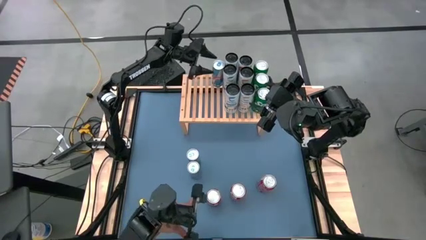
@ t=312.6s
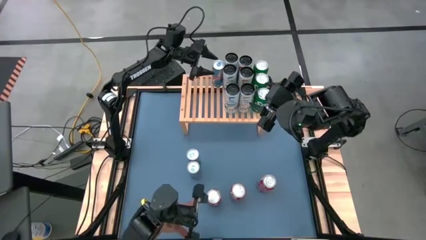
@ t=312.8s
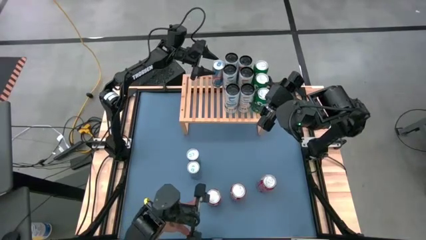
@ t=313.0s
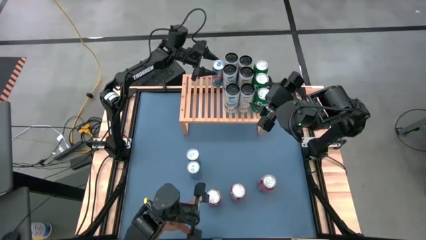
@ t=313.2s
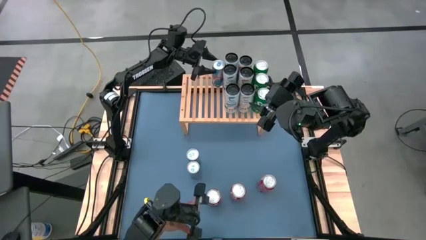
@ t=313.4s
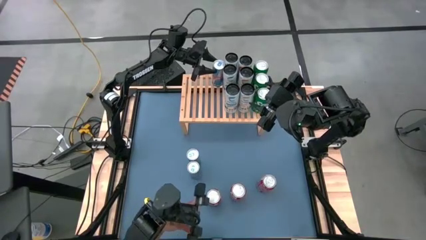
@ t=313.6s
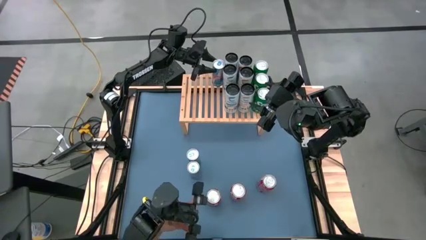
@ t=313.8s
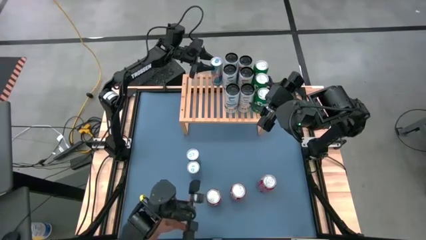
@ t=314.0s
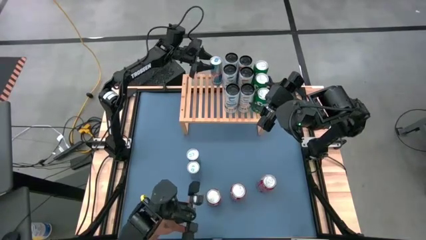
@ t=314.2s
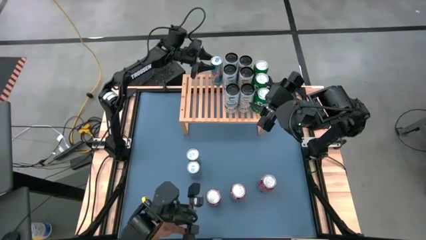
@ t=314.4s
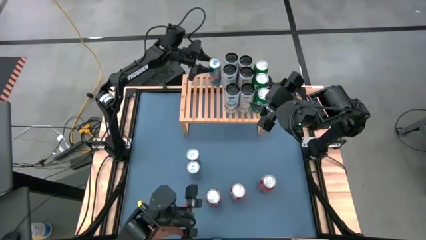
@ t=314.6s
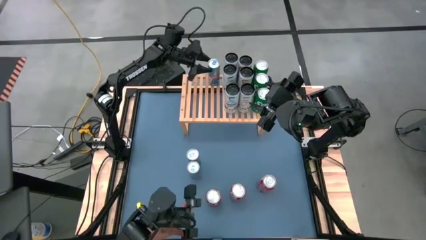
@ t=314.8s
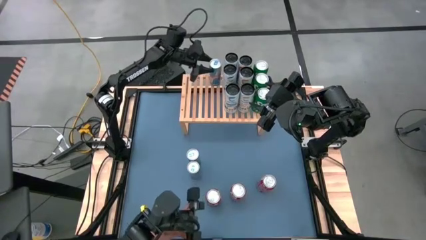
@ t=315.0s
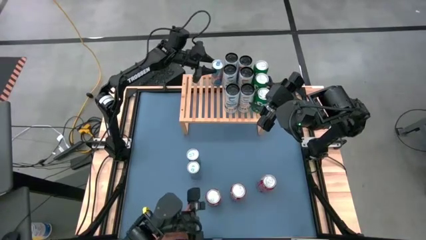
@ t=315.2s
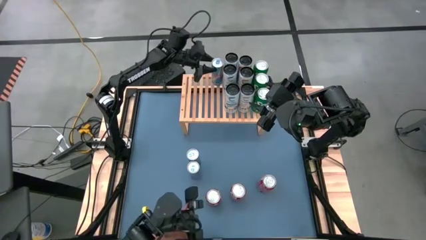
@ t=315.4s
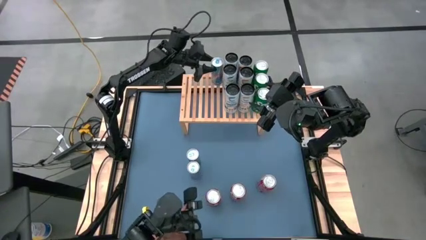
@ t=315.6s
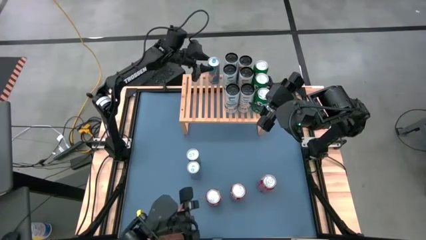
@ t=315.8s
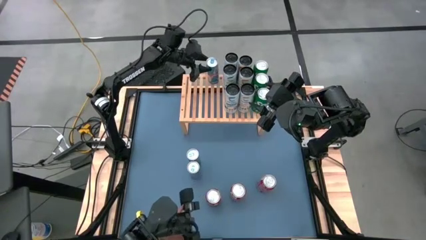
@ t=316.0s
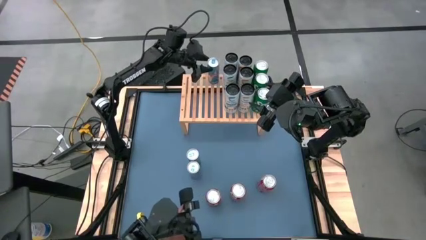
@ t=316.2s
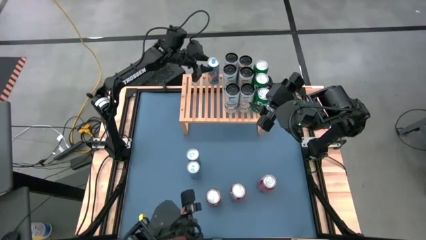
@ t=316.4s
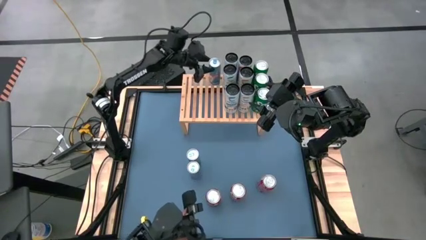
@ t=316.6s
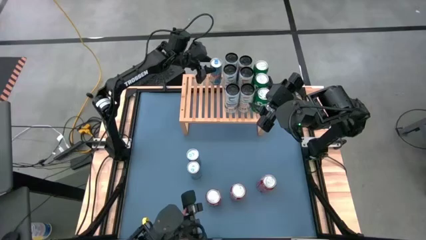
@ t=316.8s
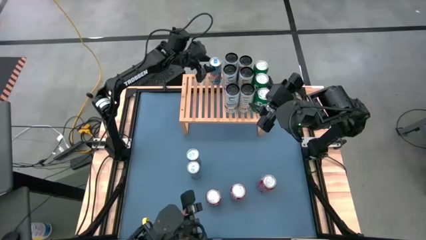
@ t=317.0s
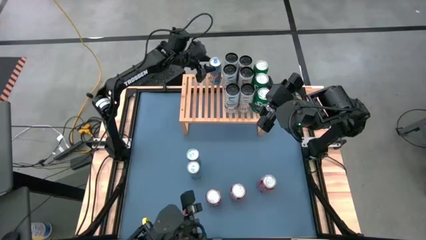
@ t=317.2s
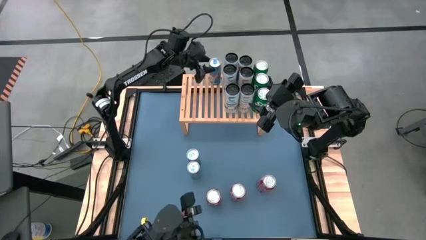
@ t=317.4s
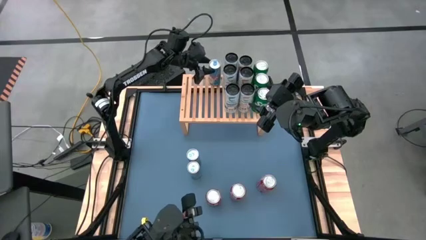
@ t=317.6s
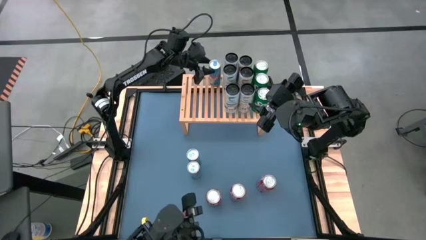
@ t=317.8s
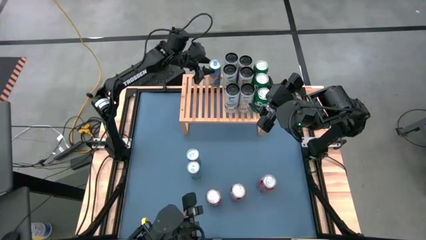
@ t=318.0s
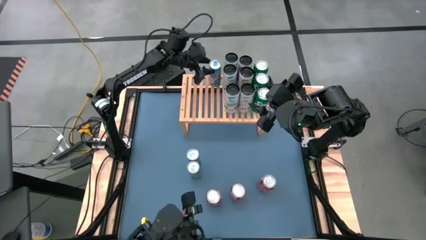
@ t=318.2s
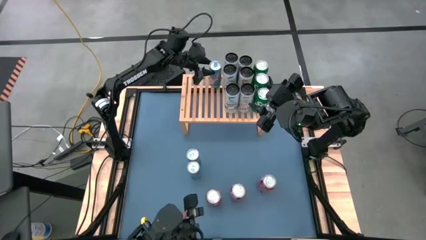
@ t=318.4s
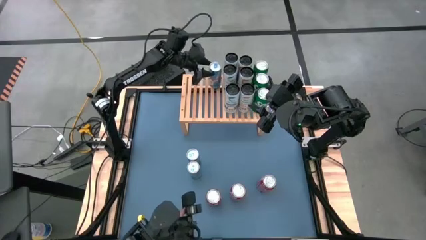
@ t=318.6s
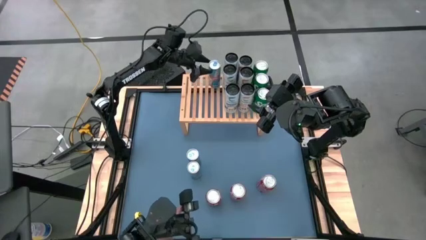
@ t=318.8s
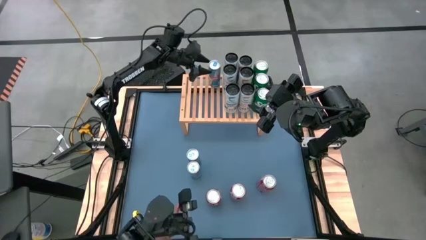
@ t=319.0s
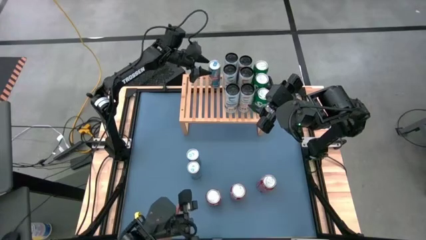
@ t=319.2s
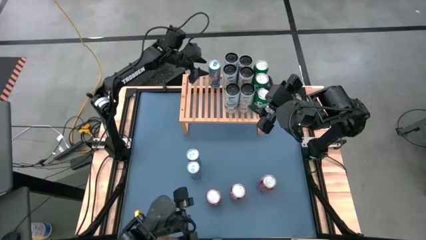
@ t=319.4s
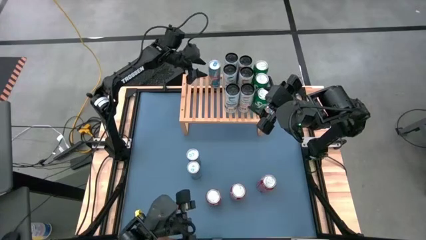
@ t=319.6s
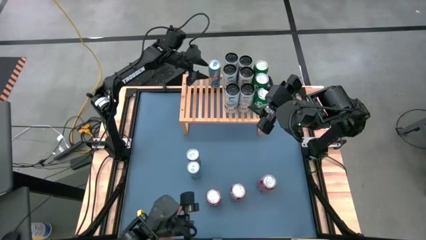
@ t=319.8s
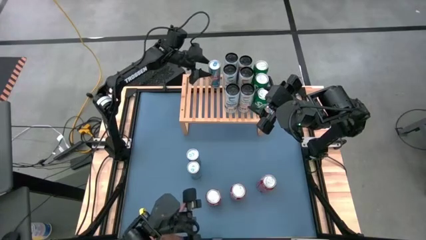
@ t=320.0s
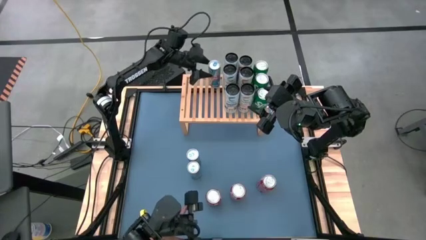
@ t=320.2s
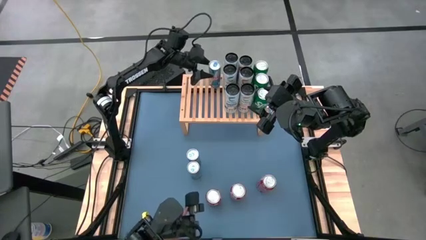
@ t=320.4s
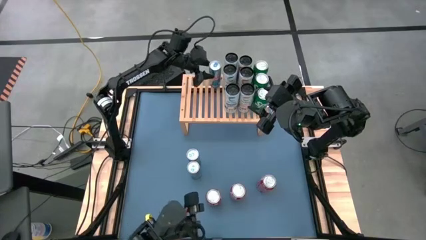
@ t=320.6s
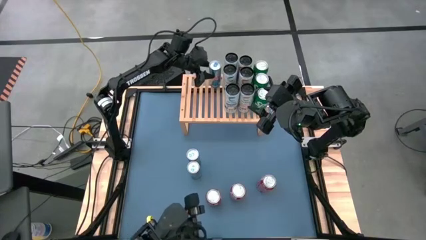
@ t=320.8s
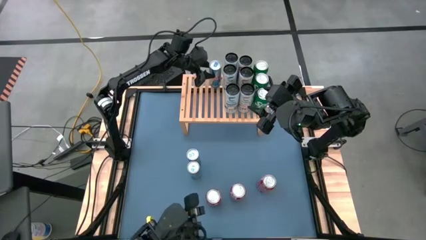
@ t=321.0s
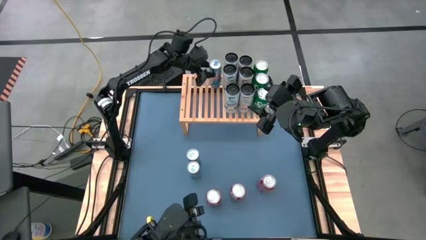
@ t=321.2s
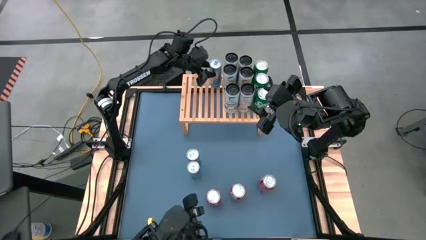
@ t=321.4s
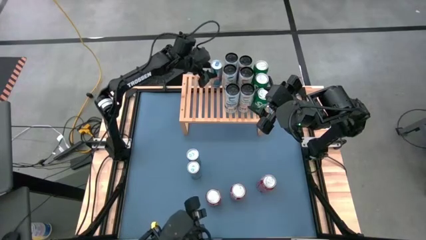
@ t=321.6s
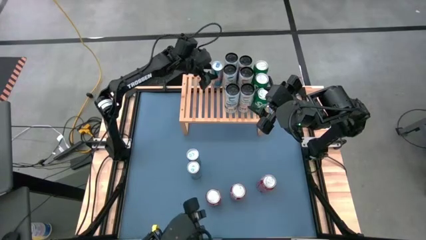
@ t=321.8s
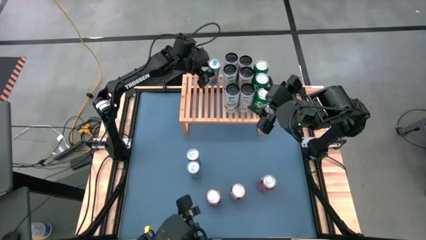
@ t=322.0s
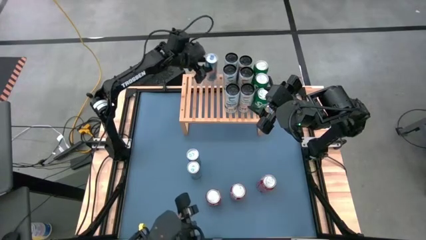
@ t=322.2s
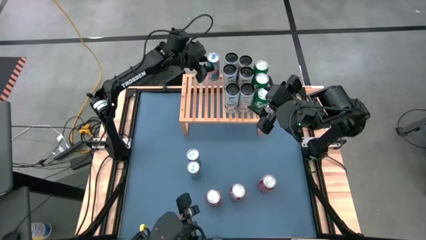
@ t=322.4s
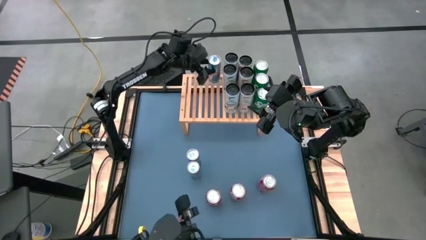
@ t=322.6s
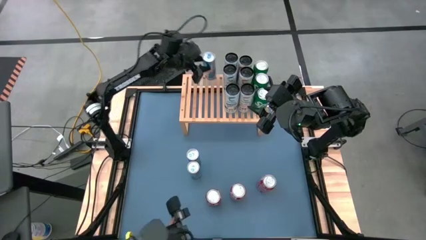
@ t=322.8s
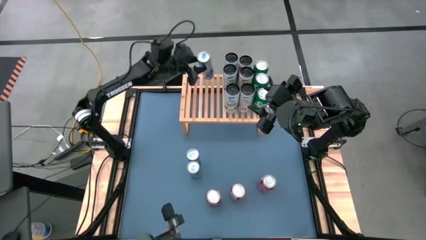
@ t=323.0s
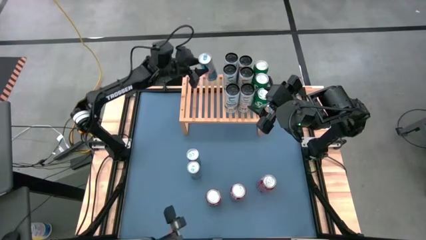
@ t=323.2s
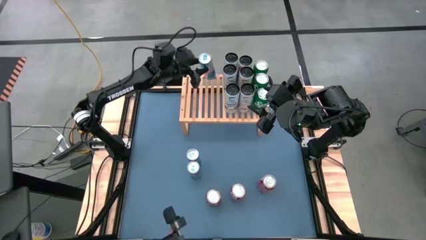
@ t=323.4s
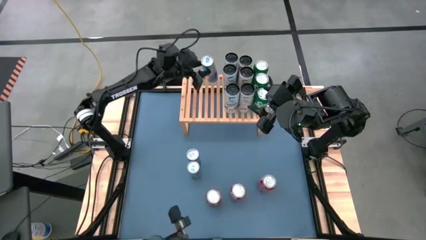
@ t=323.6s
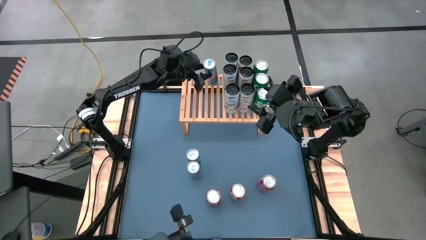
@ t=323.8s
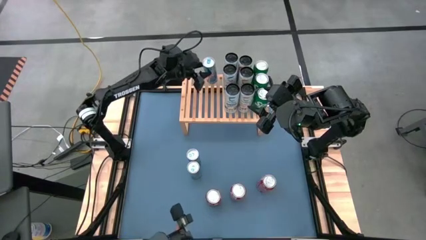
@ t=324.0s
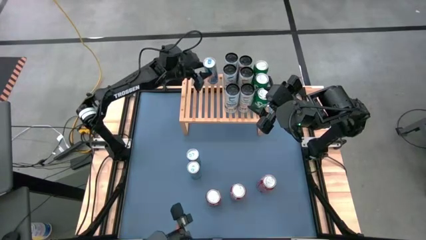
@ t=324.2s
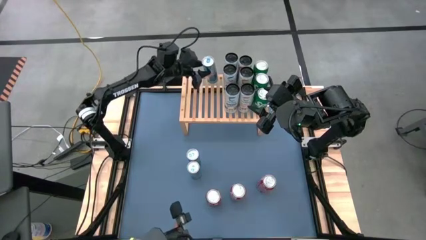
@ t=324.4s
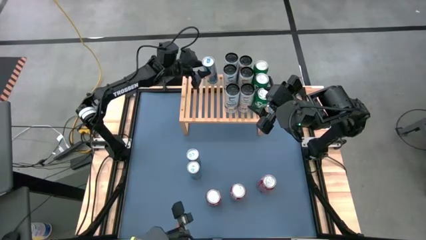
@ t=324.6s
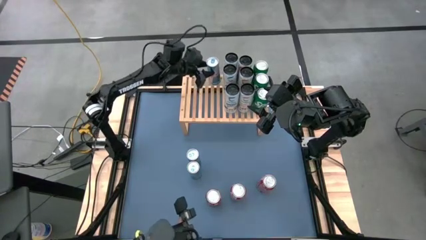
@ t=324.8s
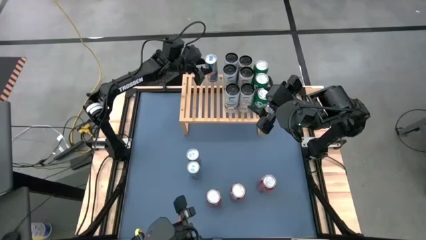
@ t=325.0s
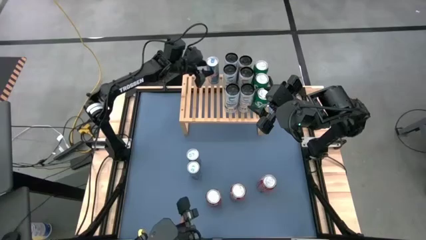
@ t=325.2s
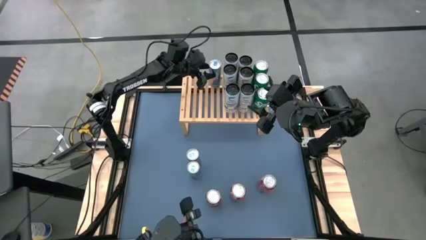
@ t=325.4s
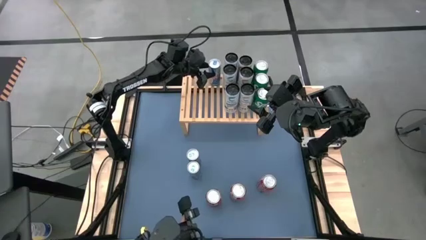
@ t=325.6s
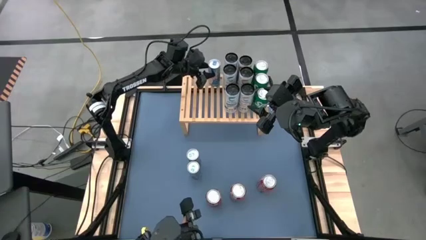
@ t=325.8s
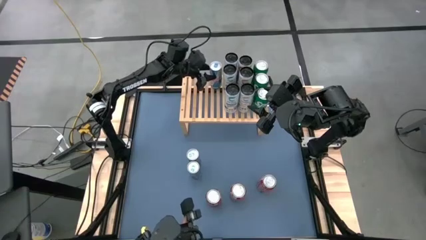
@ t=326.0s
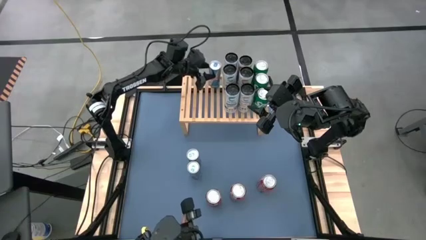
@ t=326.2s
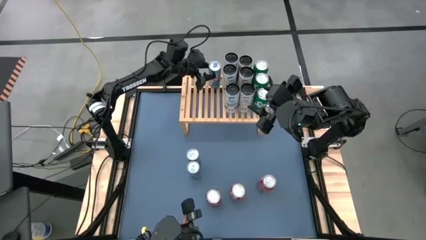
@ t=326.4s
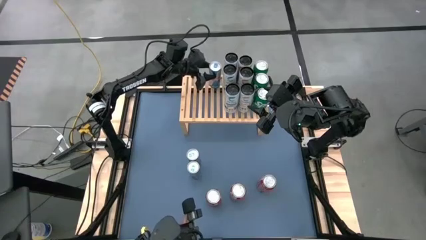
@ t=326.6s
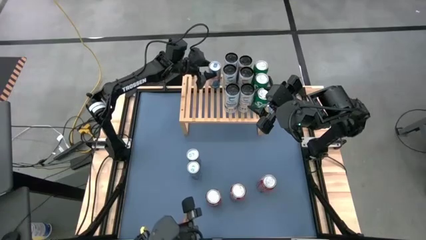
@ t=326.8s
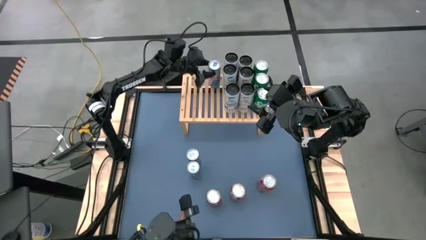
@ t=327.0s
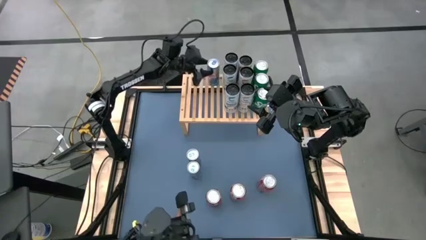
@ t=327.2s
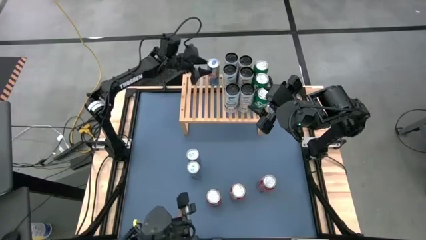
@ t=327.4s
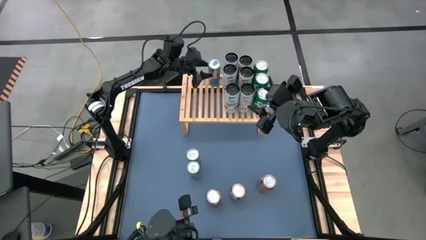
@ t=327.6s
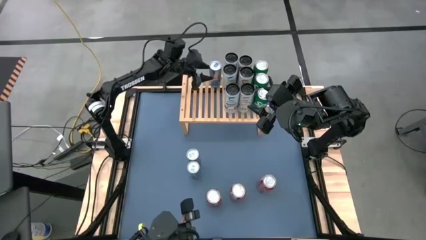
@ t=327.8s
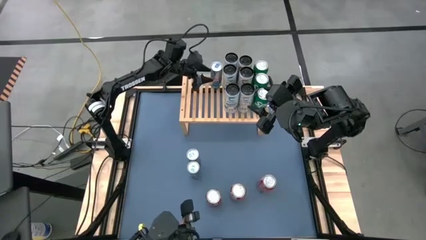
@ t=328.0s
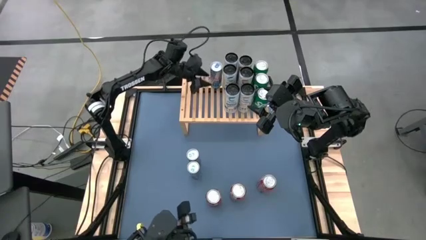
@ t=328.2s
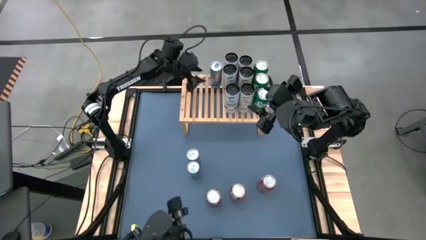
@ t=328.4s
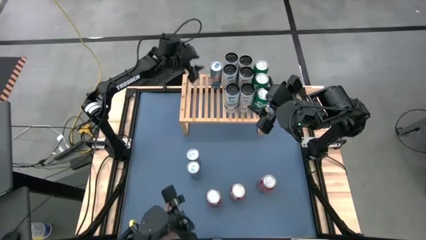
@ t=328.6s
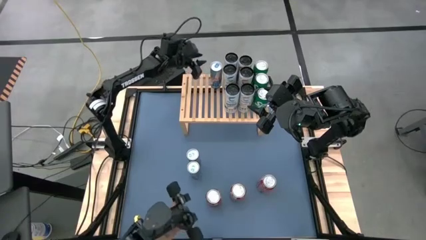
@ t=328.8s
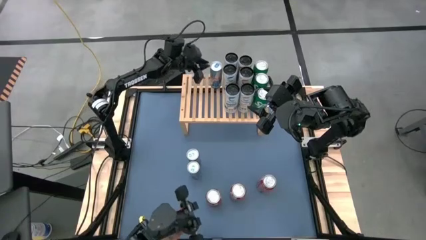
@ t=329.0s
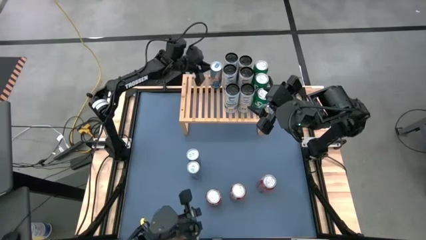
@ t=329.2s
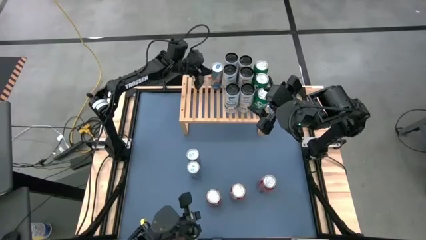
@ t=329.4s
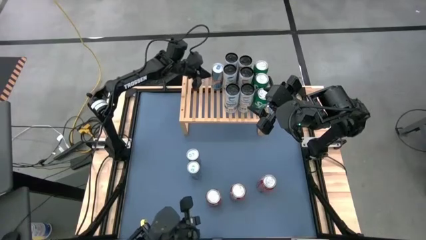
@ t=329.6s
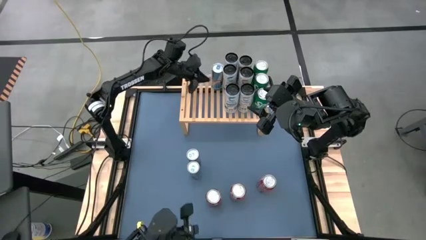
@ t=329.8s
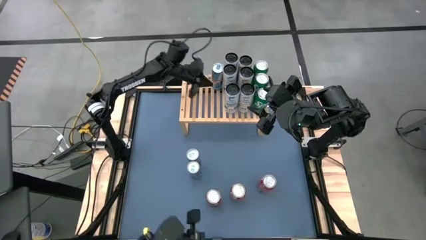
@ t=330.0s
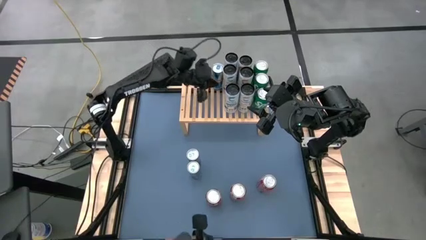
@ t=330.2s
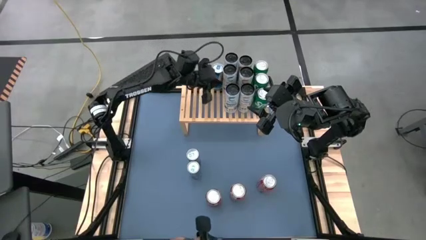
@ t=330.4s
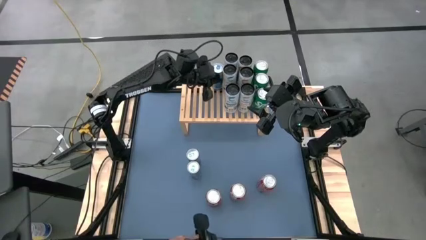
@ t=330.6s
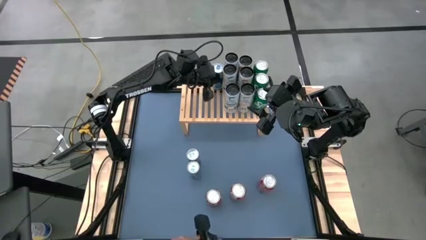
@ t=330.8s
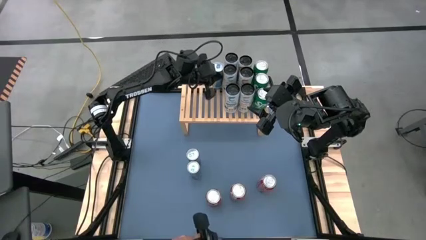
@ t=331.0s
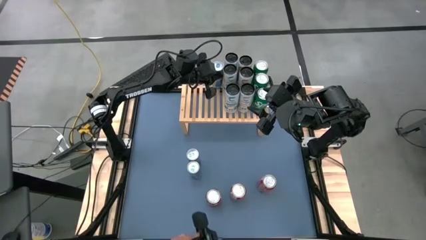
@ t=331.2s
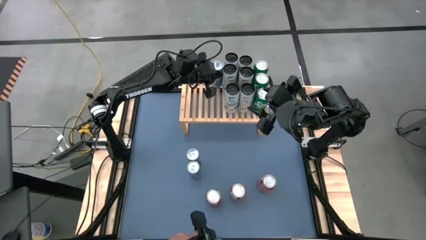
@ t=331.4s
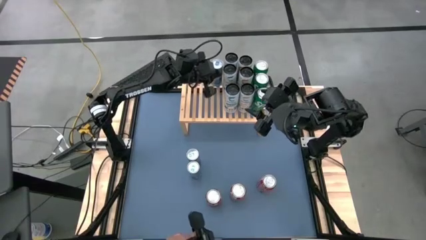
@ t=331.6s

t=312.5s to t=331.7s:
Task: Place canned beverage on shelf
Put the top left blue soda can on the shelf
